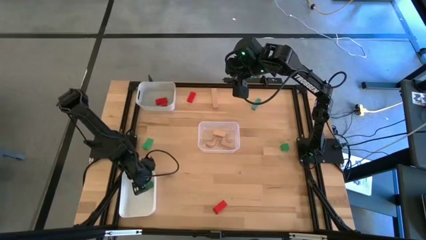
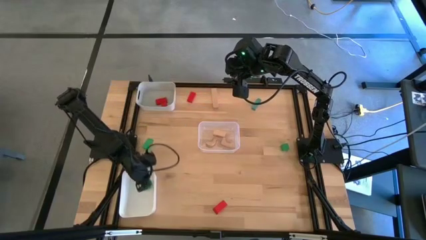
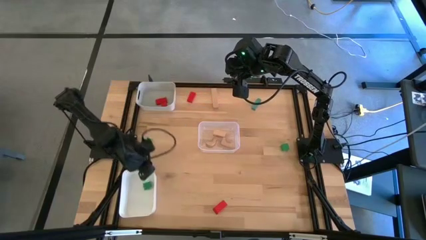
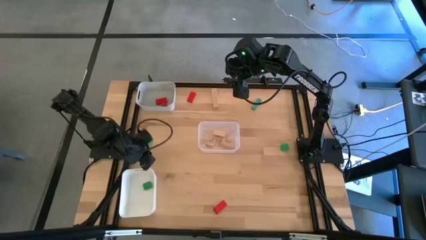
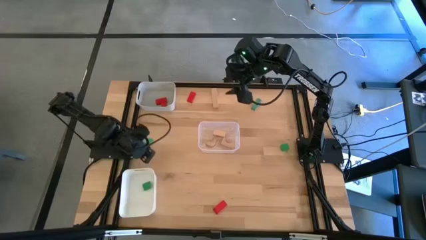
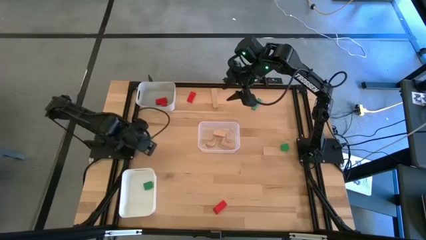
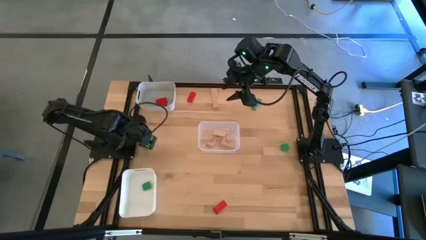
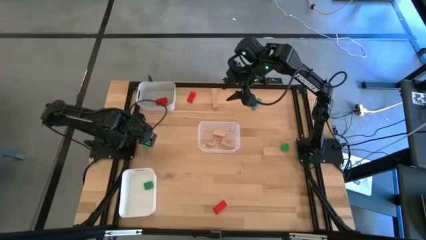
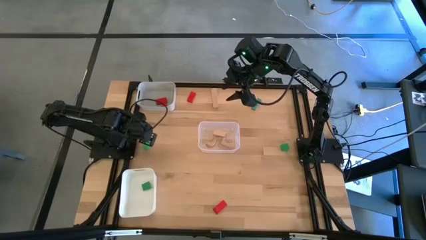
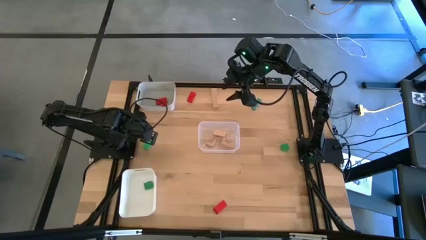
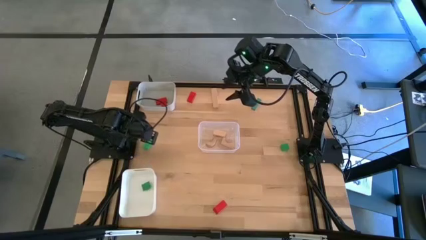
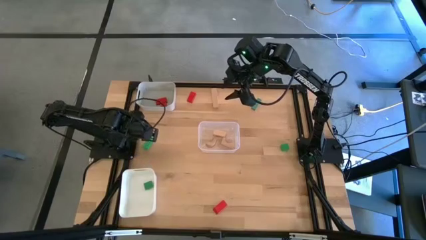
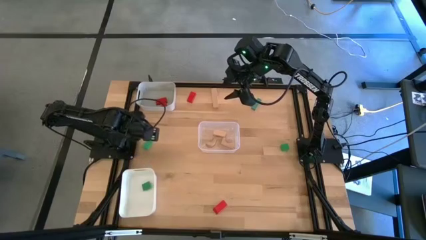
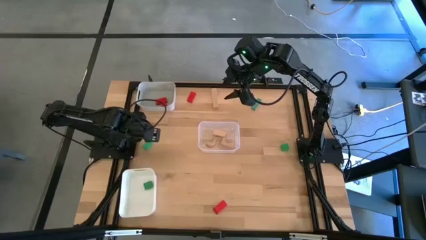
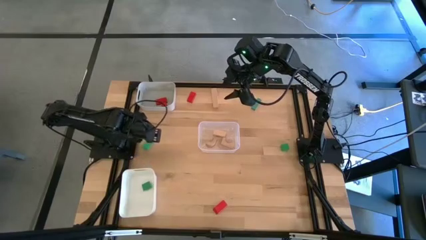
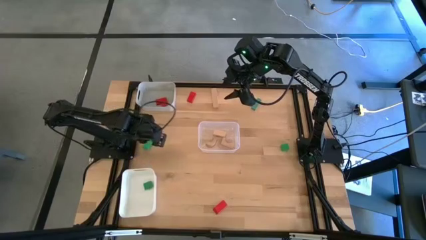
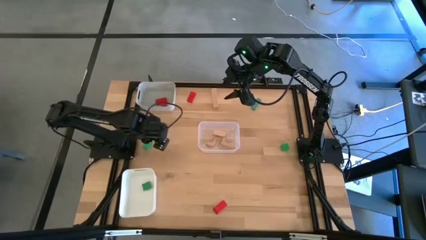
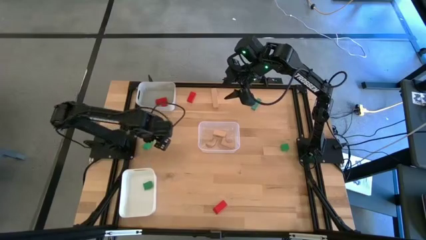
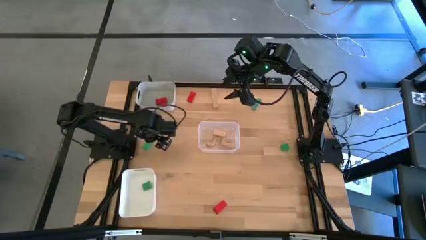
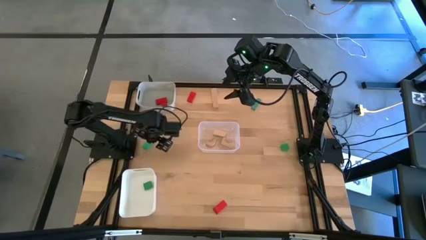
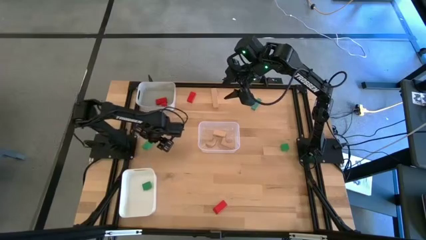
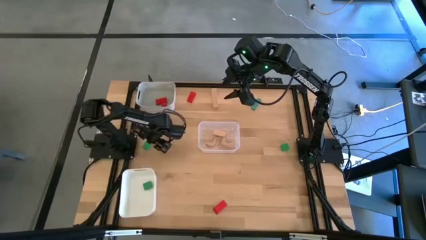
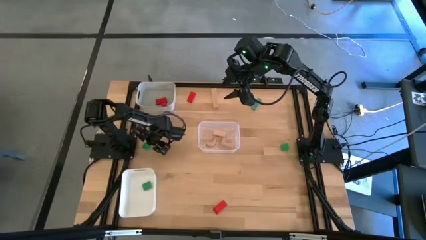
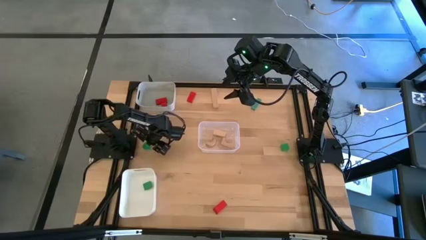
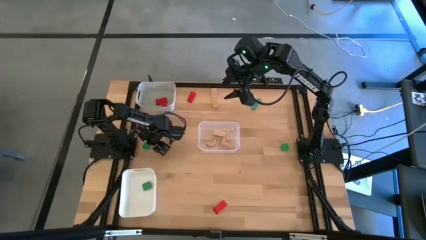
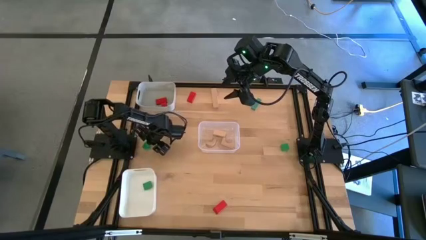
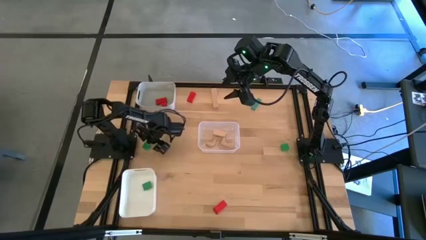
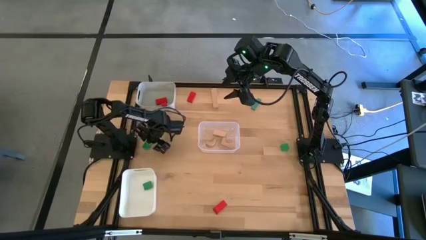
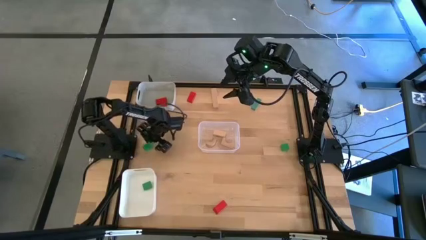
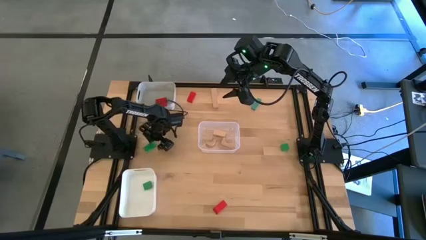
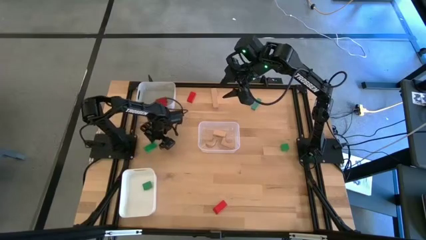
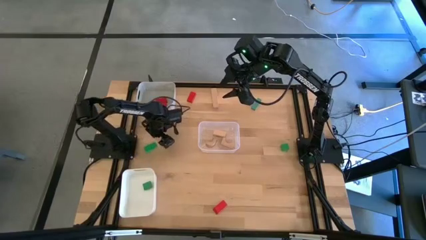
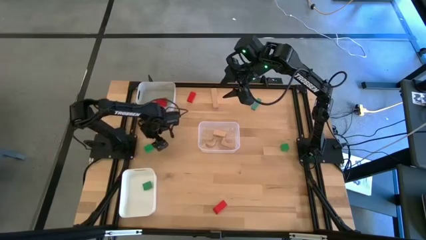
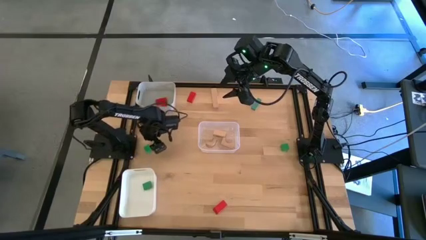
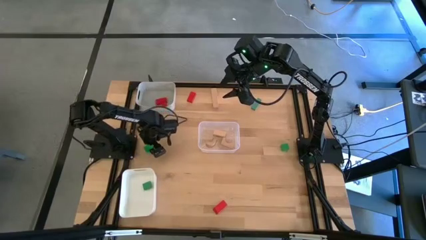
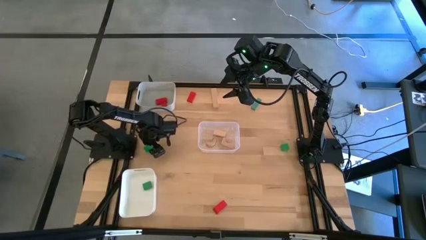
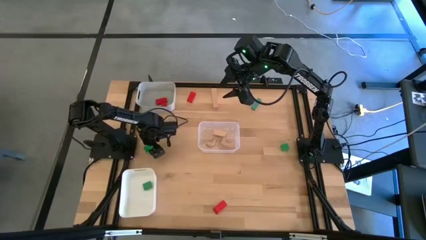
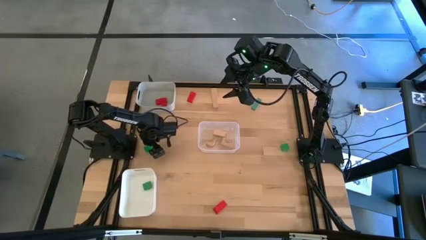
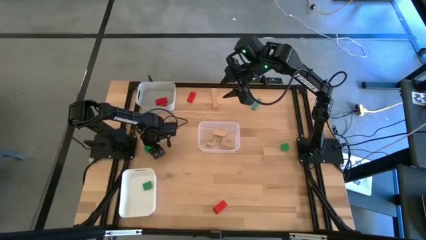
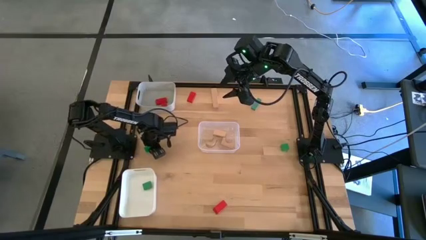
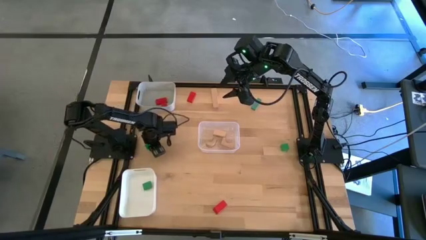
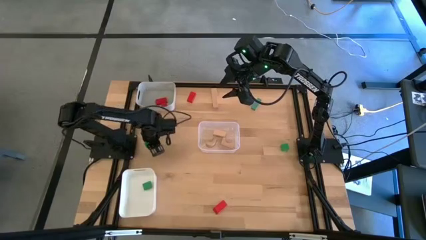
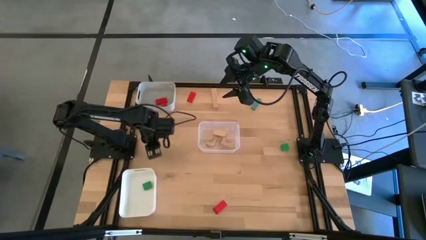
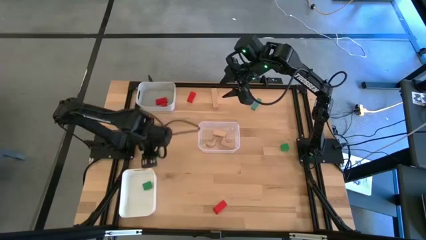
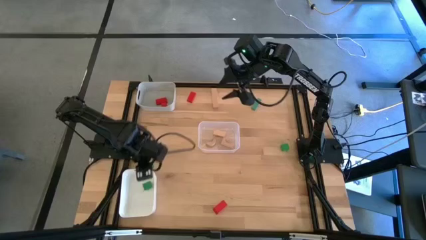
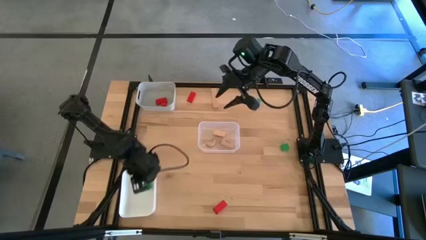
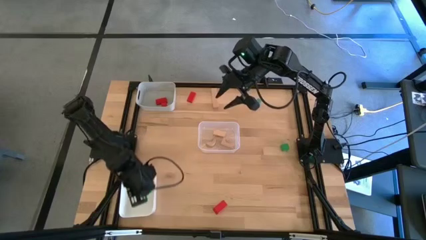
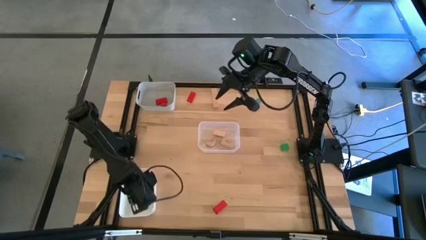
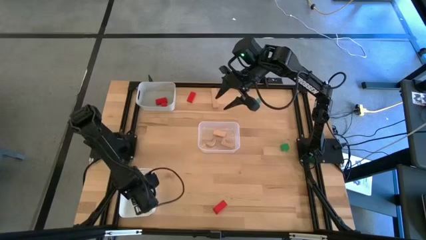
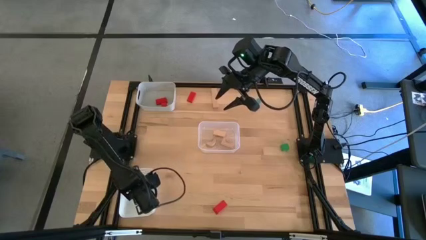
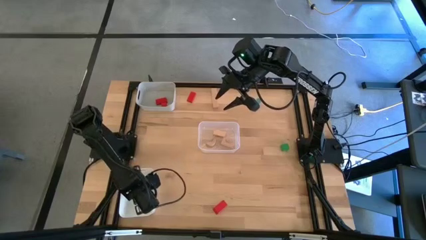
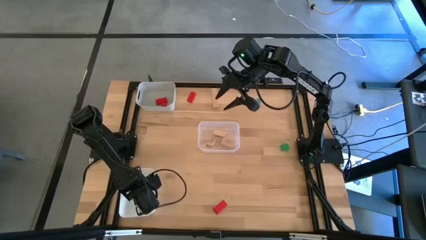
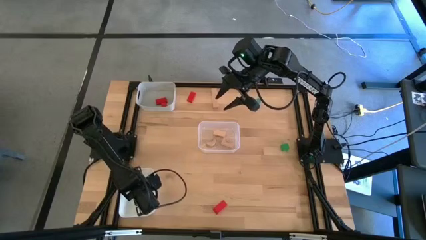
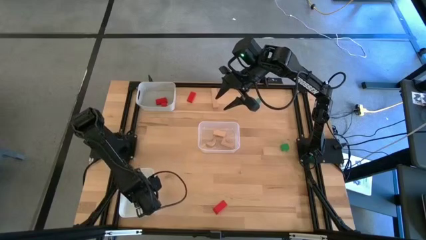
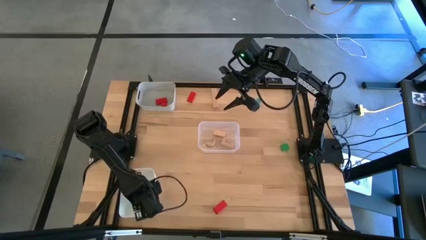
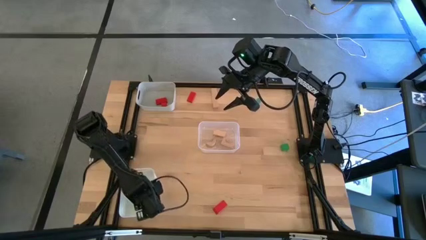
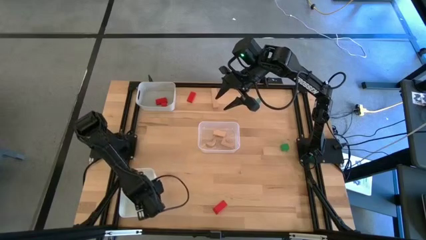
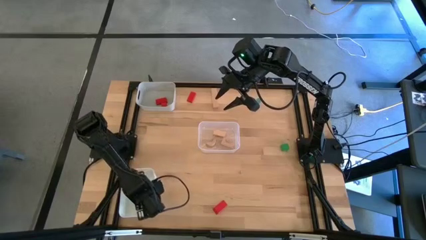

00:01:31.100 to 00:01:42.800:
Task: Sort & place blocks by color
Put the green block into the white bin

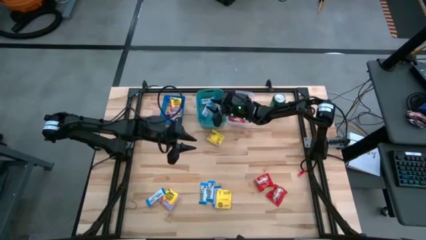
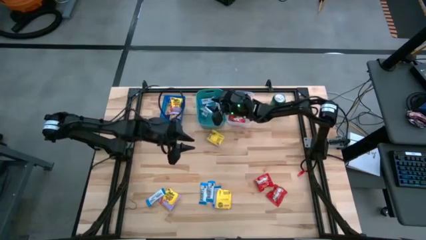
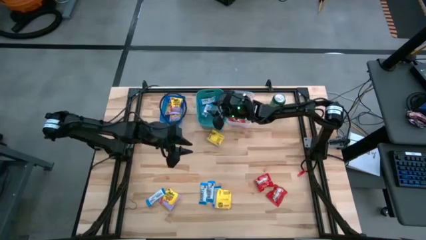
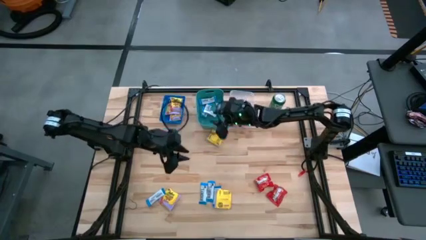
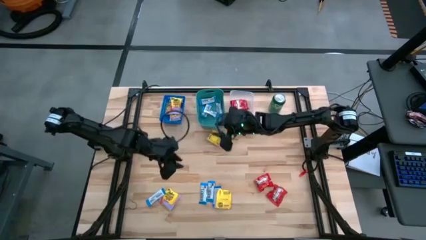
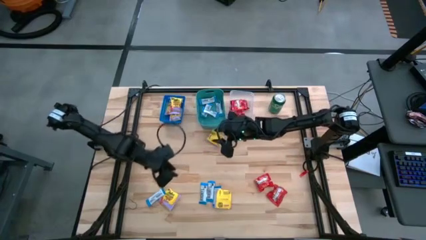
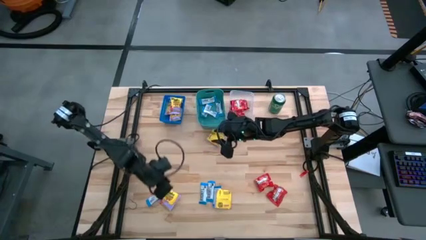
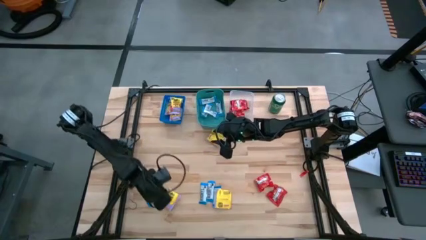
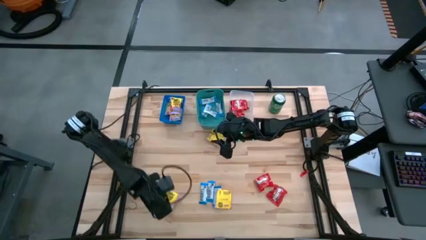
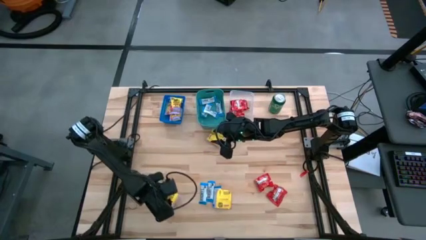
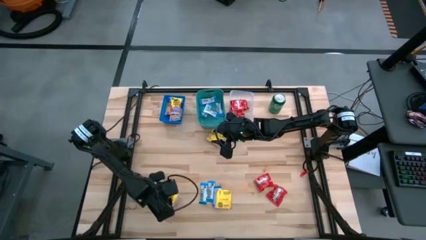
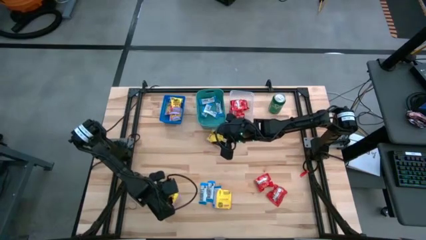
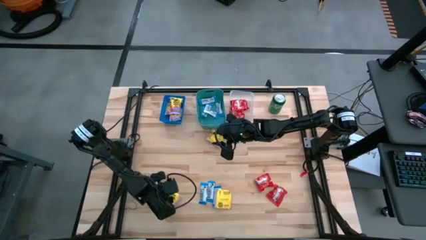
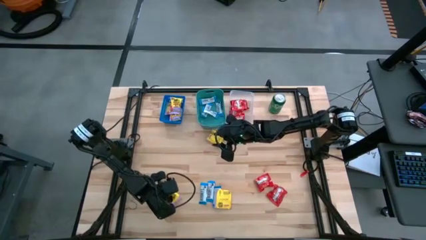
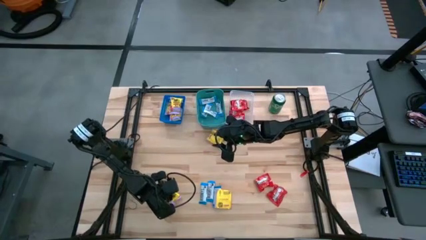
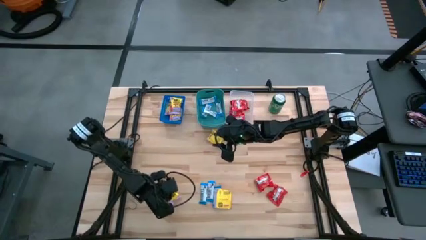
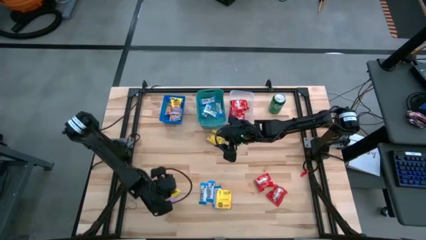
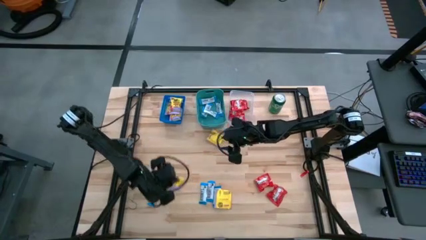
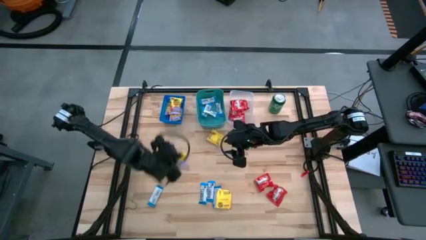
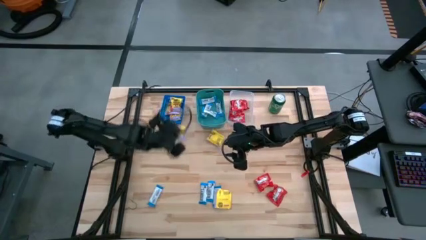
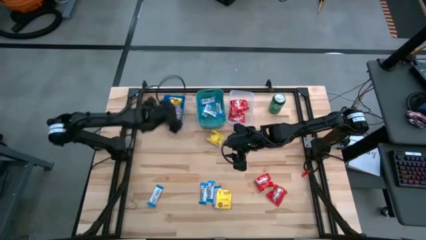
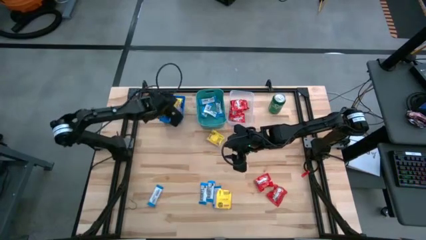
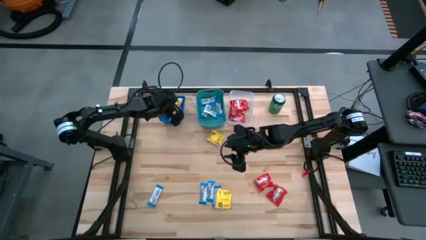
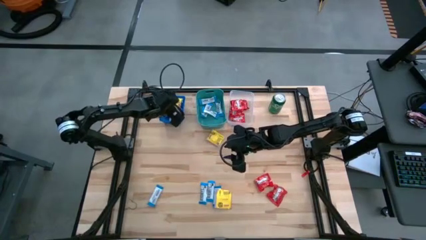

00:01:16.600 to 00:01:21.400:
Task: Sort candy
Put the yellow candy into the blue bin
